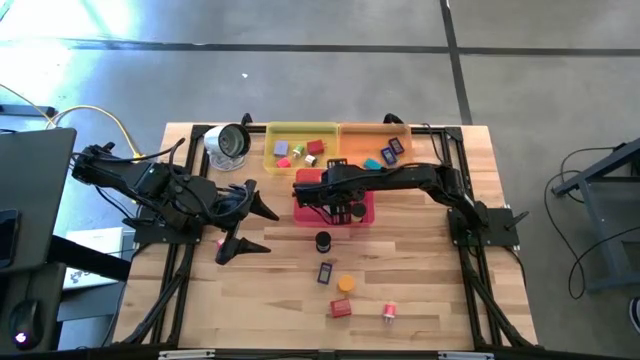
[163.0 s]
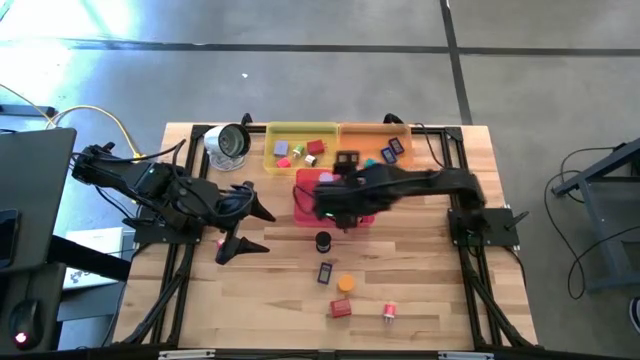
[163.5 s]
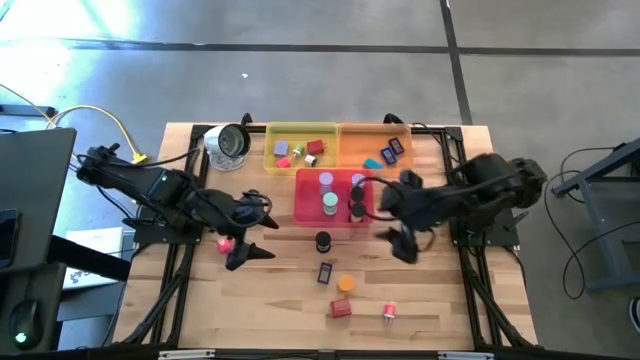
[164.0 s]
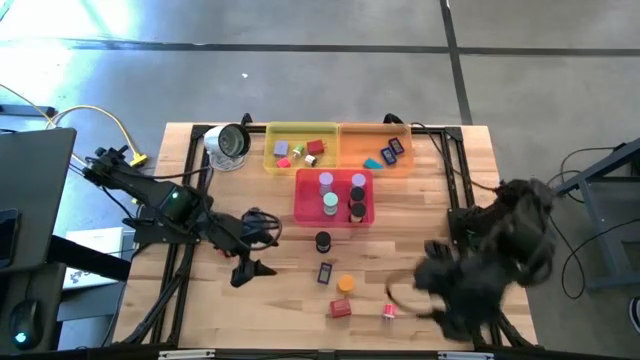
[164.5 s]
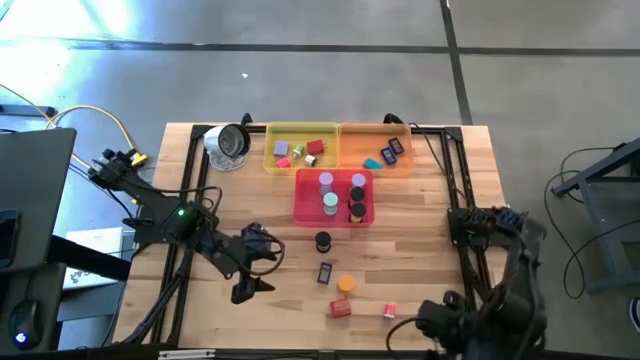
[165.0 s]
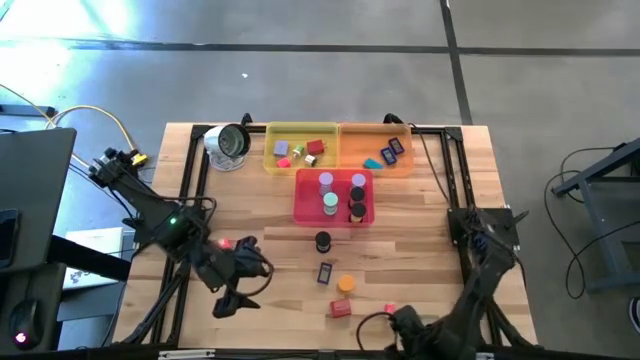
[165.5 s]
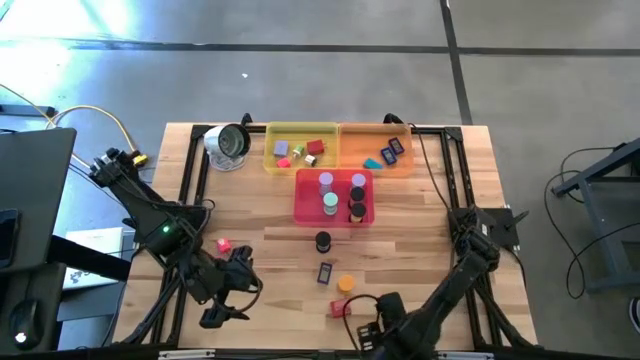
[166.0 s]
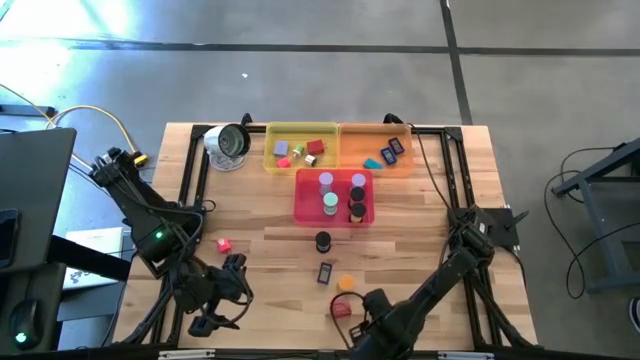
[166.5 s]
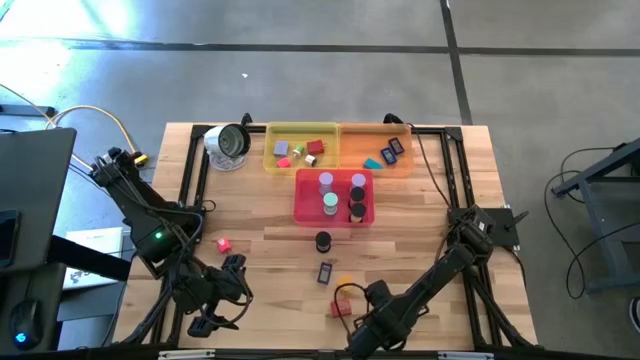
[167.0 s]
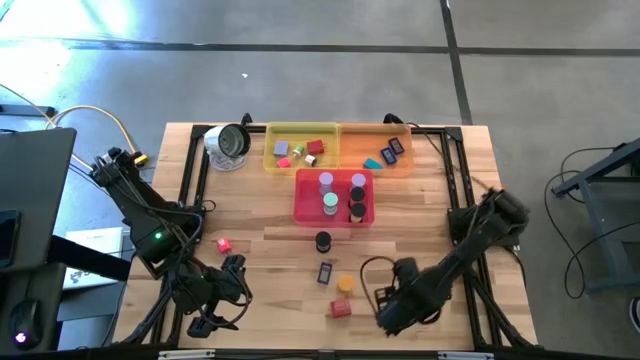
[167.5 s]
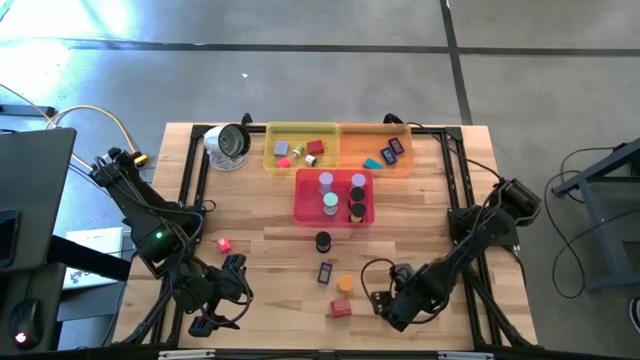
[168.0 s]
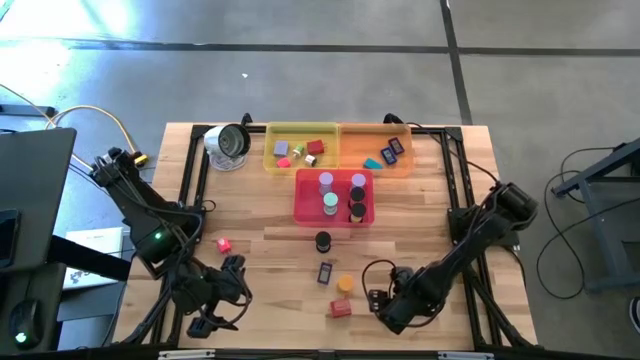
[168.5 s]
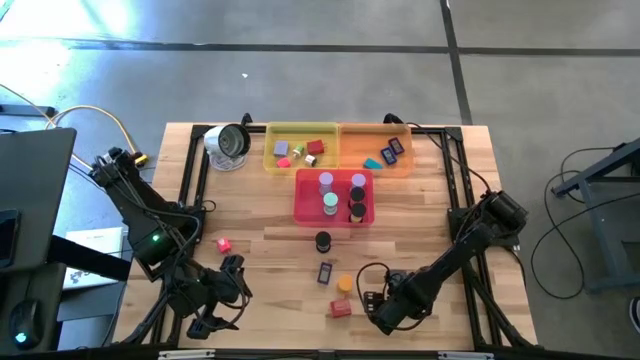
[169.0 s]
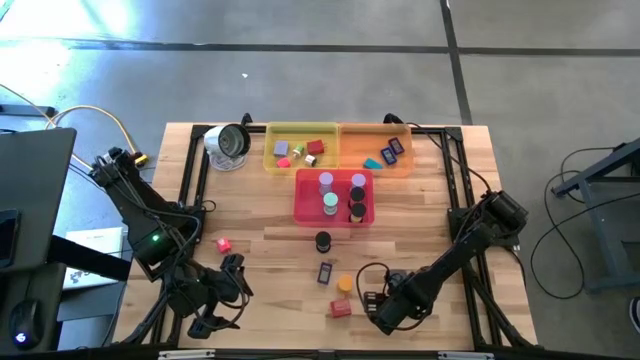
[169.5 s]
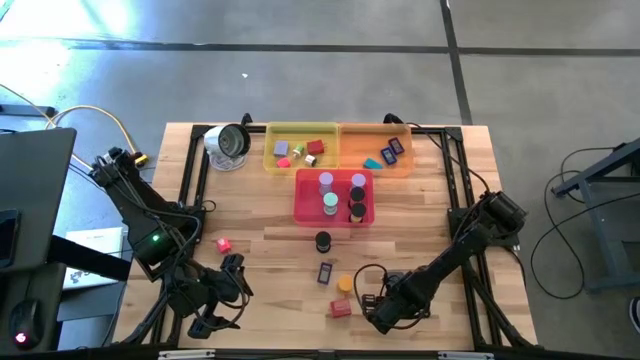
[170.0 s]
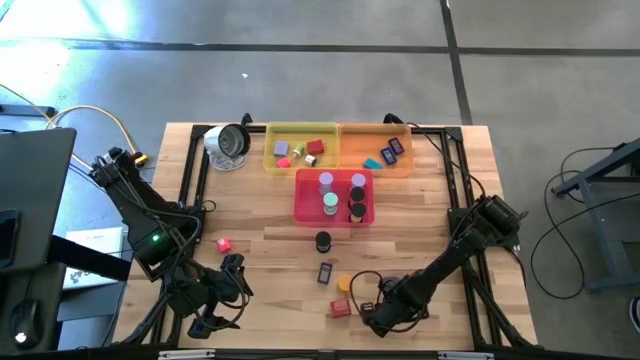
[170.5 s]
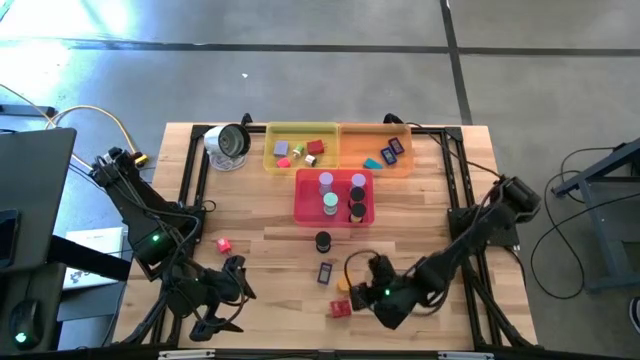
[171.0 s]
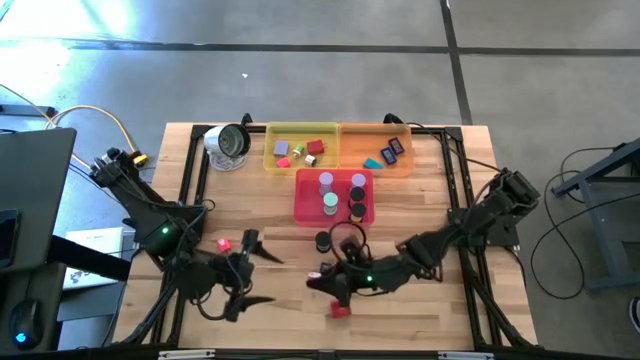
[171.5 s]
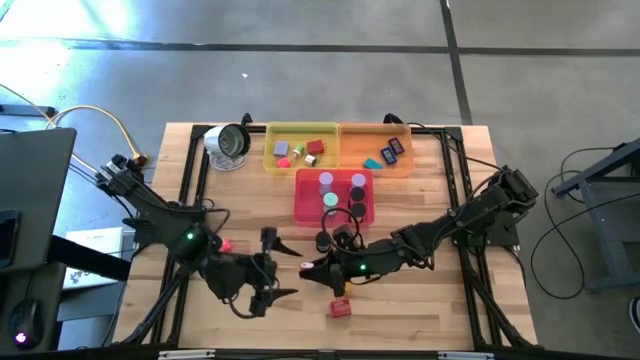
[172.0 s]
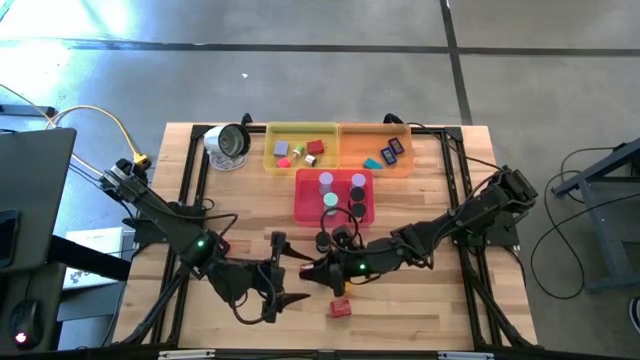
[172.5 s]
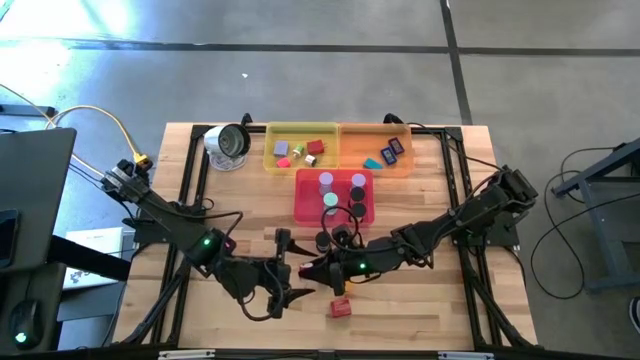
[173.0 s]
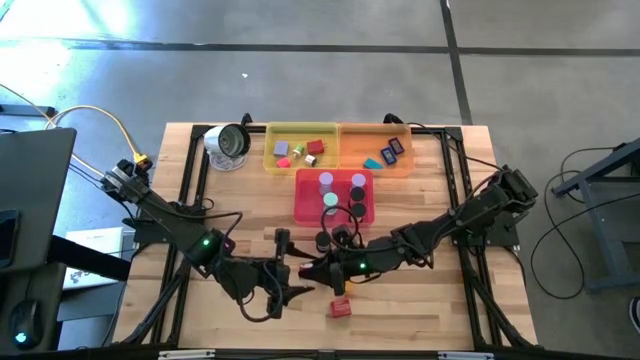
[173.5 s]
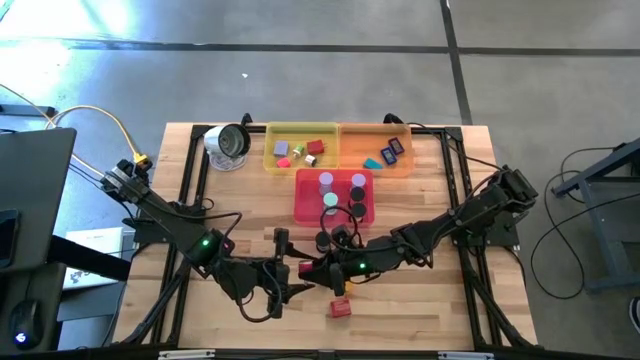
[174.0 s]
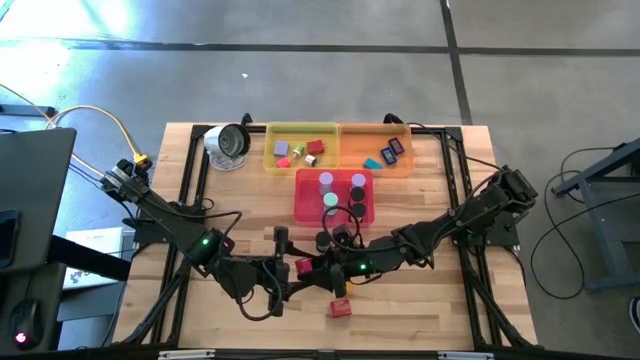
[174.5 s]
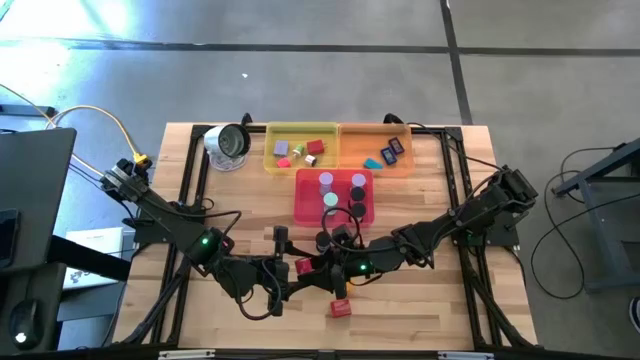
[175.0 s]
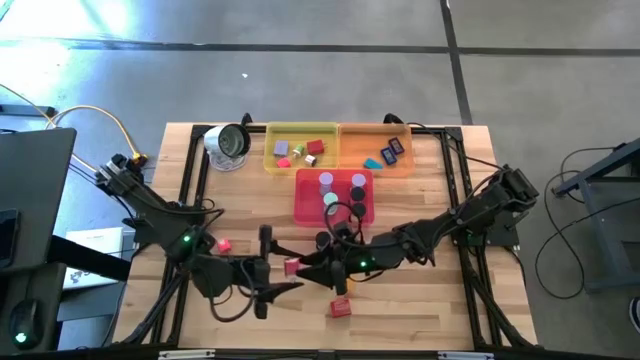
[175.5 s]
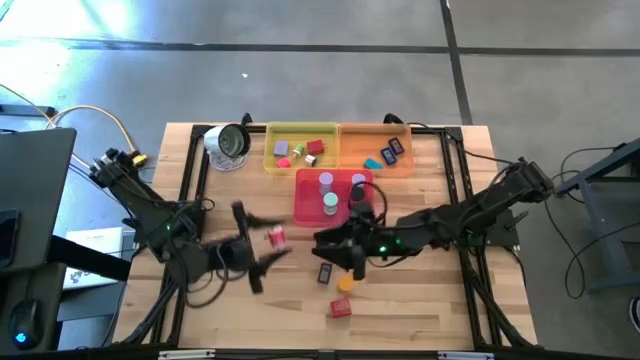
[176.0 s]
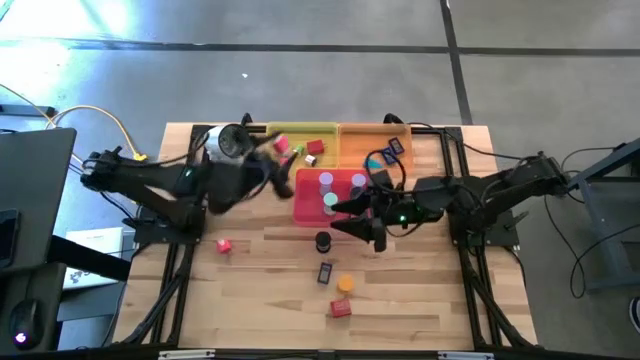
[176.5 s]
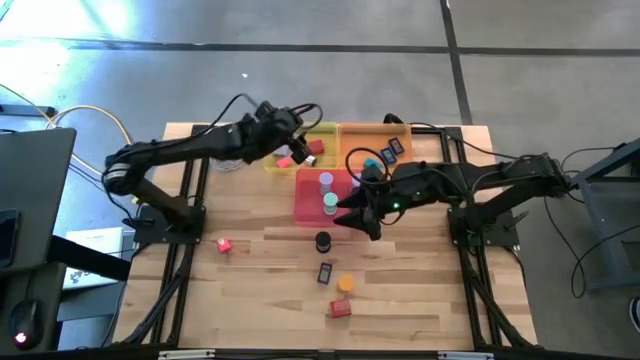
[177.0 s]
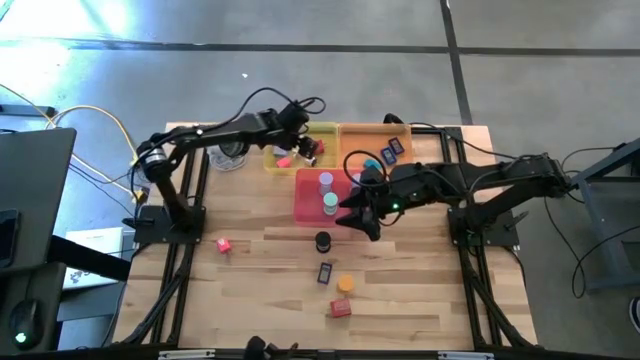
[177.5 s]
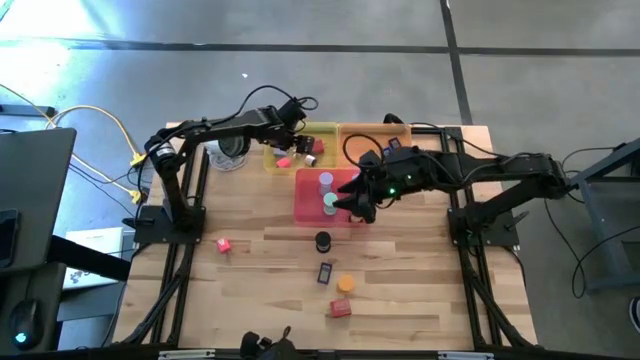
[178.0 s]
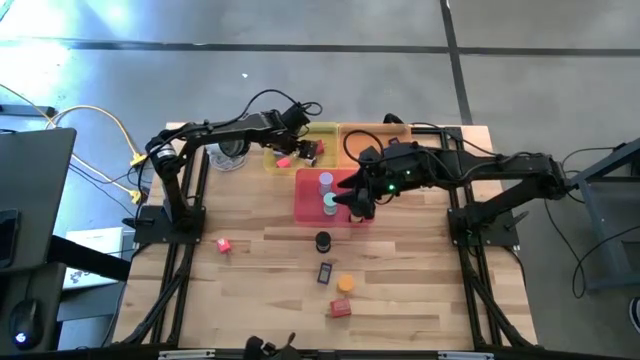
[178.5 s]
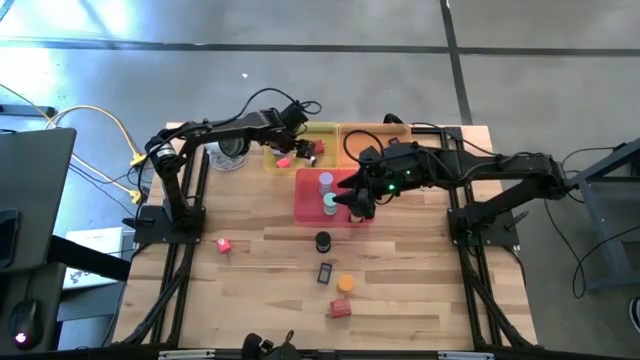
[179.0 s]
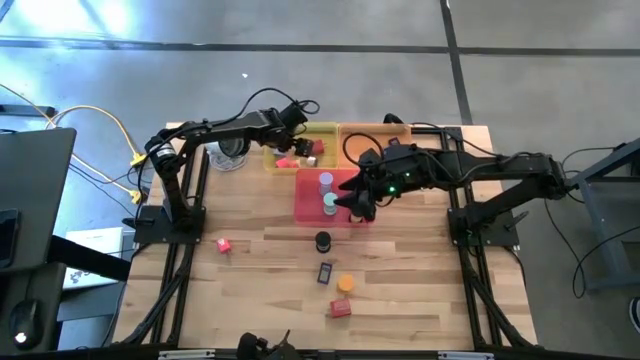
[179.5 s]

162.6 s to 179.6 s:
Task: Pick & Place Office items
Put the pink and white charger adapter into the yellow bin

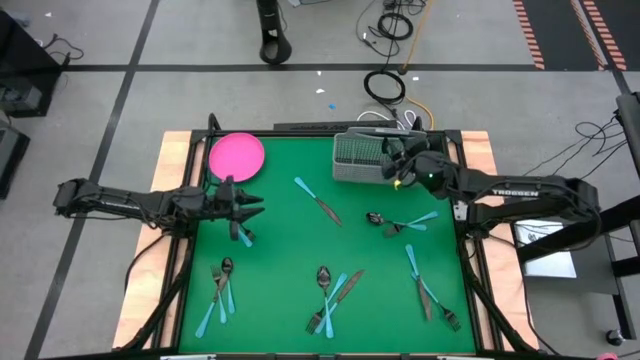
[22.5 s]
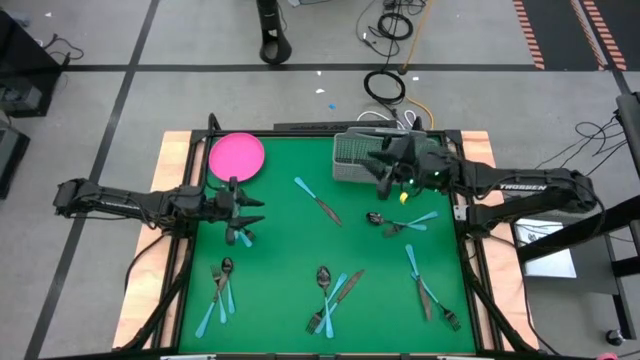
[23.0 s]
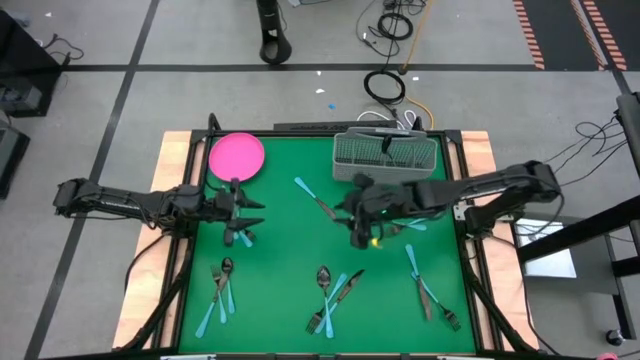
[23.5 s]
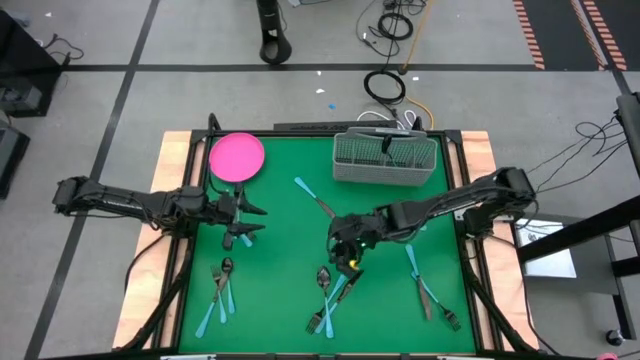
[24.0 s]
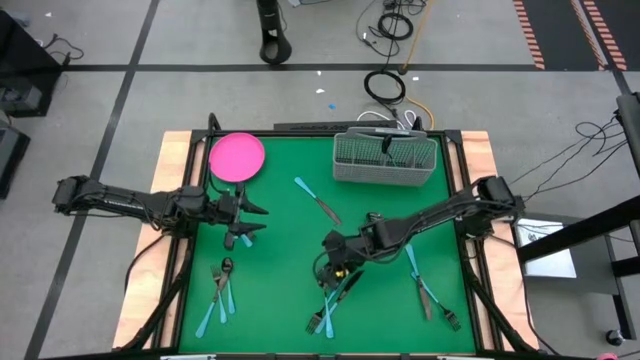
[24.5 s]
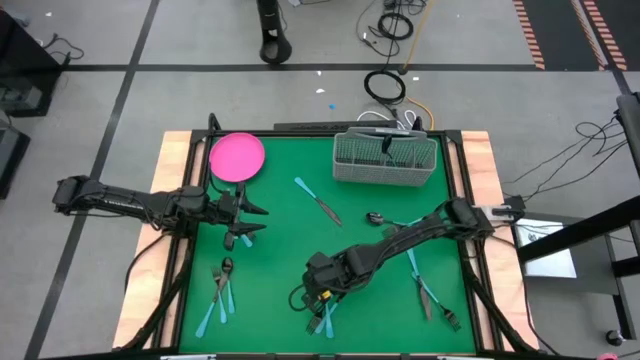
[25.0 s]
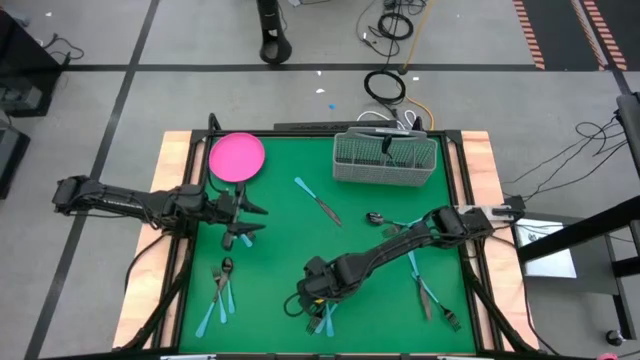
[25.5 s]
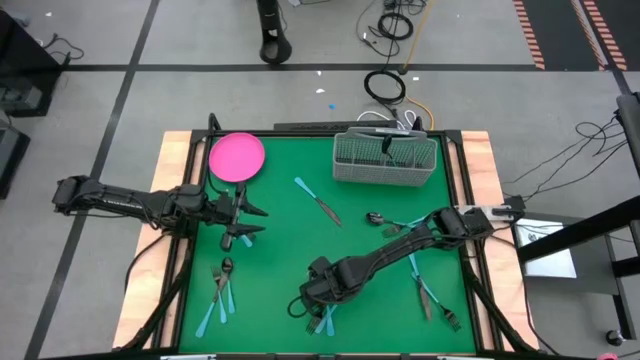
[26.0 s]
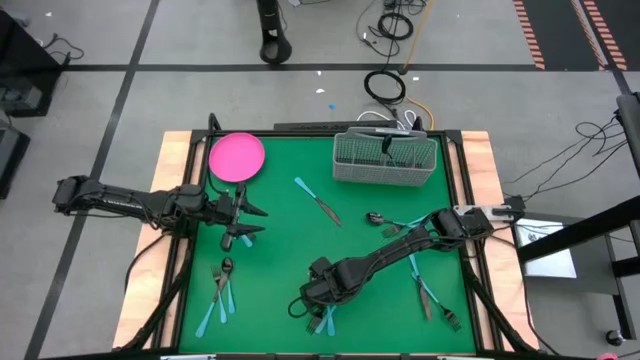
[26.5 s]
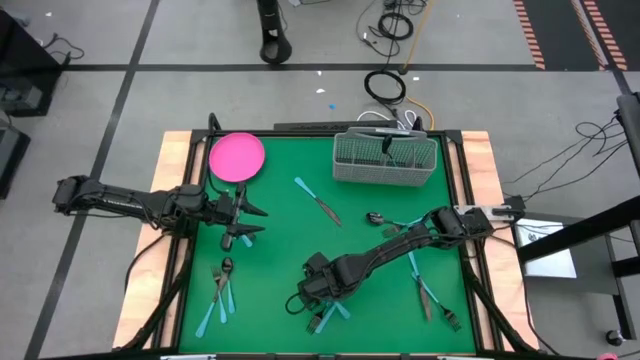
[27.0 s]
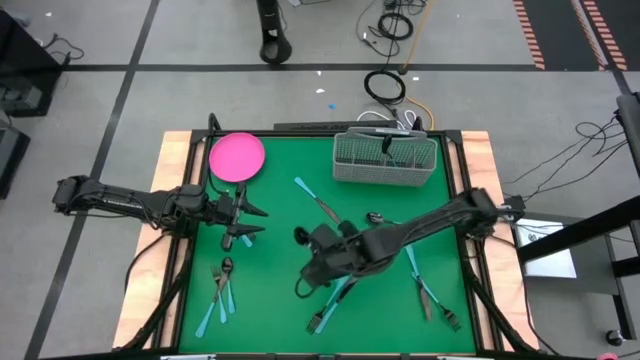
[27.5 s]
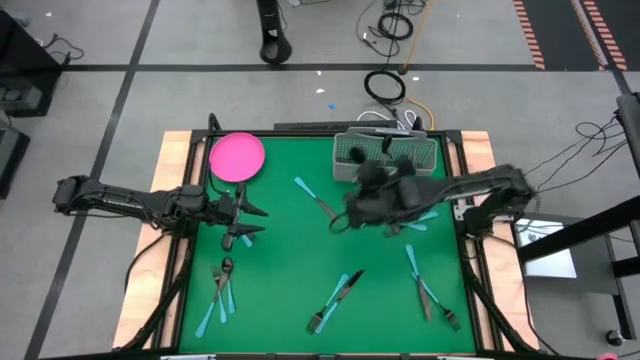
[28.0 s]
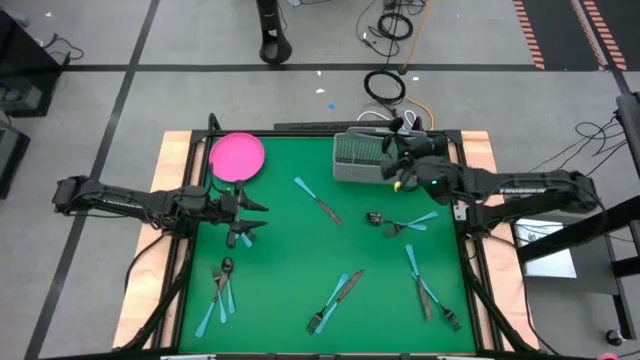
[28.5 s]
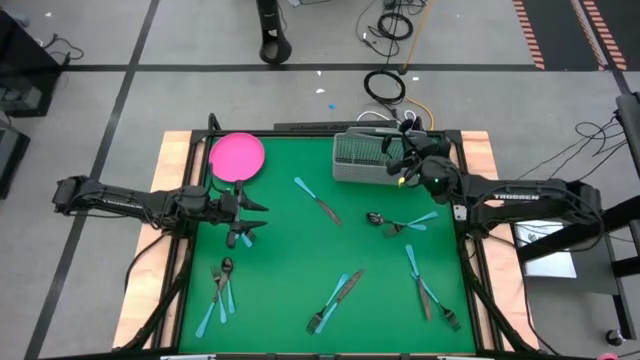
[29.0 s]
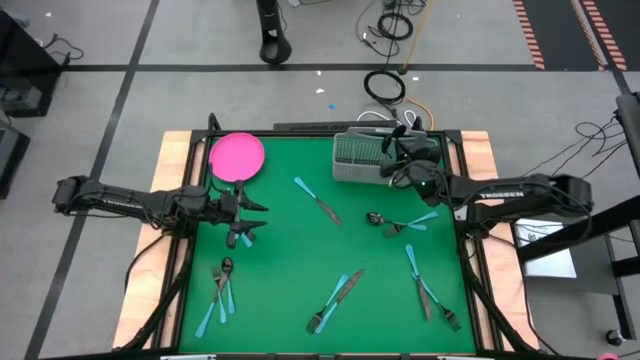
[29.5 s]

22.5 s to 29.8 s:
Task: Sort silverware
Put the bottom right black spoon into the cutlery rack with the other black spoons
